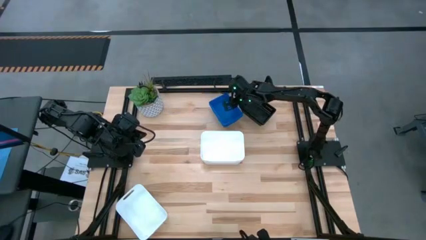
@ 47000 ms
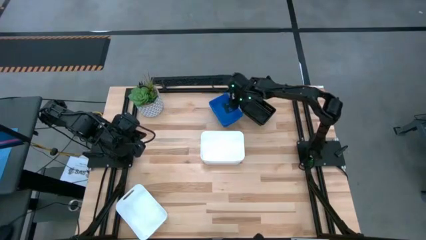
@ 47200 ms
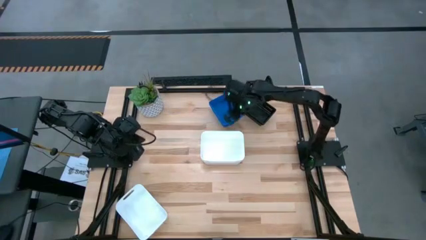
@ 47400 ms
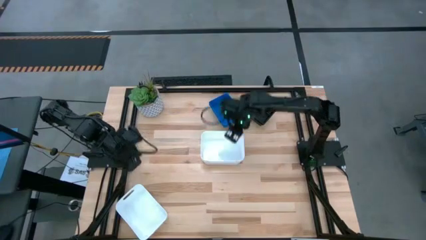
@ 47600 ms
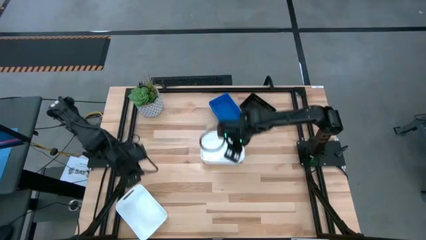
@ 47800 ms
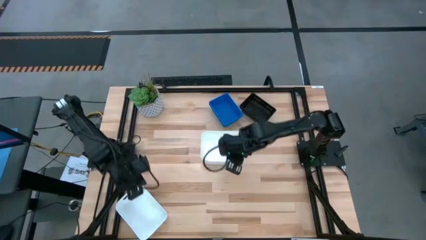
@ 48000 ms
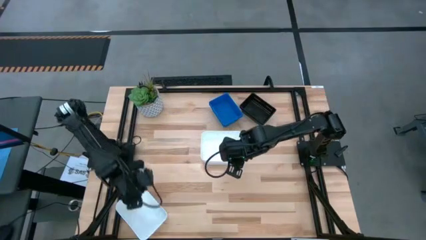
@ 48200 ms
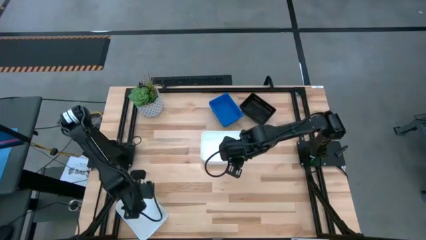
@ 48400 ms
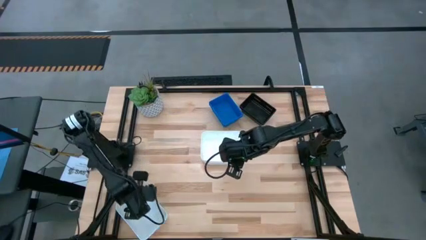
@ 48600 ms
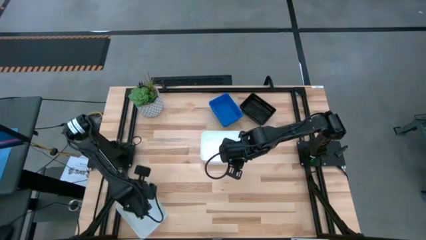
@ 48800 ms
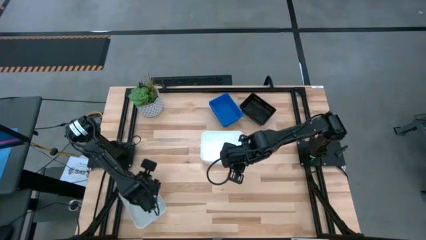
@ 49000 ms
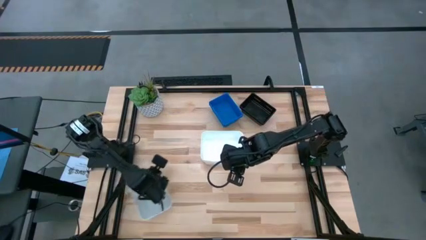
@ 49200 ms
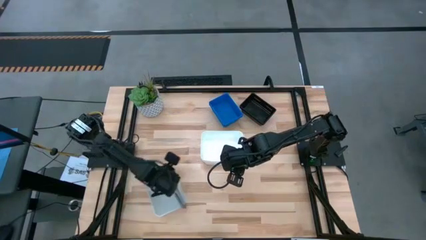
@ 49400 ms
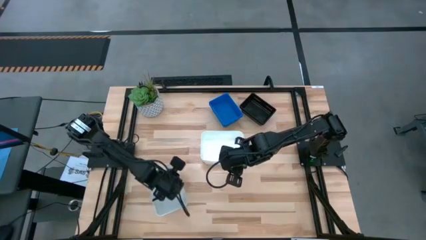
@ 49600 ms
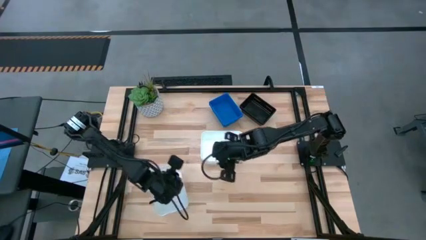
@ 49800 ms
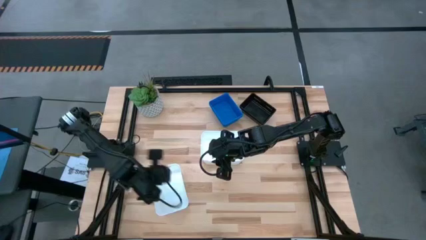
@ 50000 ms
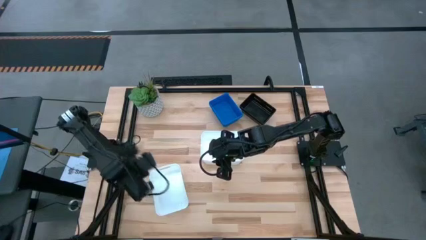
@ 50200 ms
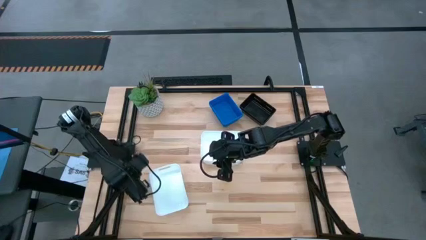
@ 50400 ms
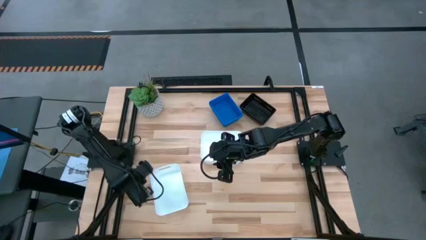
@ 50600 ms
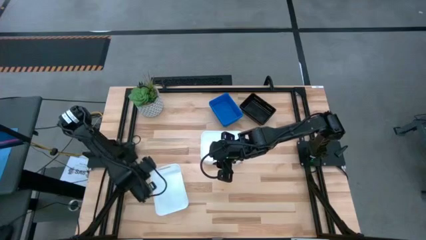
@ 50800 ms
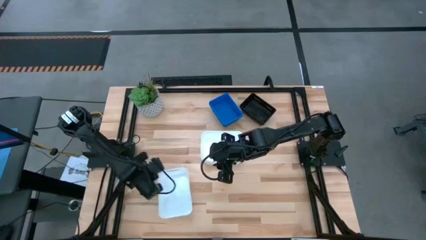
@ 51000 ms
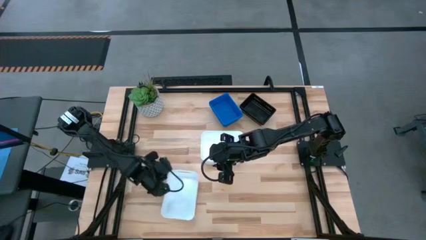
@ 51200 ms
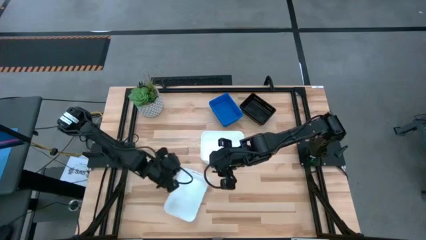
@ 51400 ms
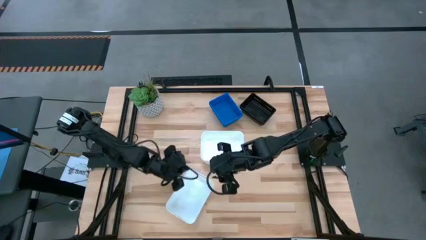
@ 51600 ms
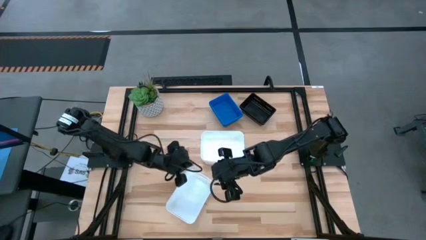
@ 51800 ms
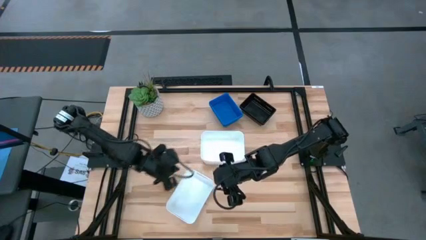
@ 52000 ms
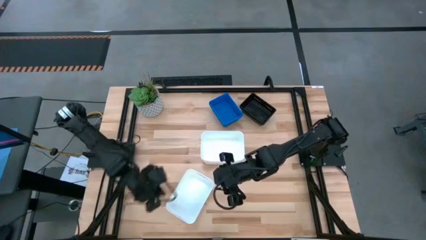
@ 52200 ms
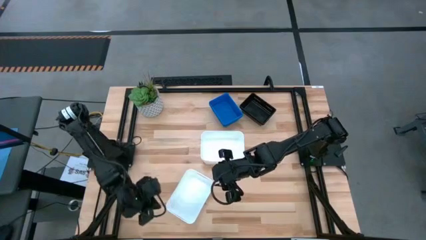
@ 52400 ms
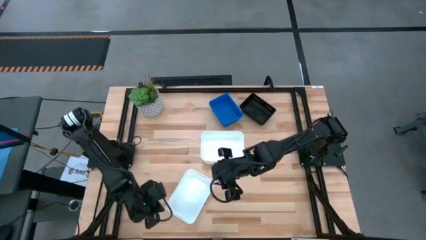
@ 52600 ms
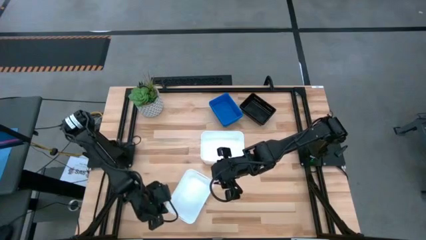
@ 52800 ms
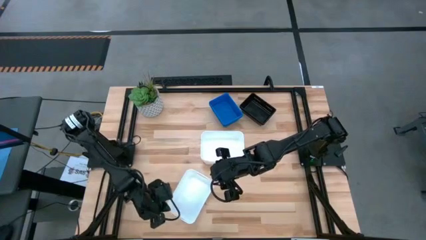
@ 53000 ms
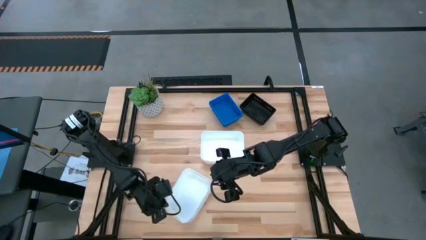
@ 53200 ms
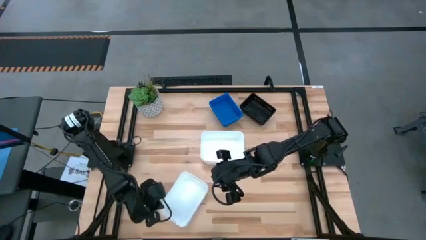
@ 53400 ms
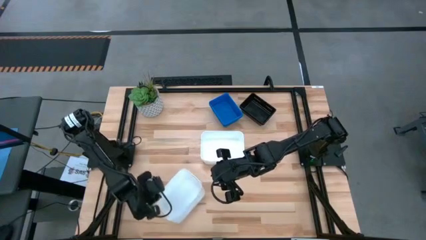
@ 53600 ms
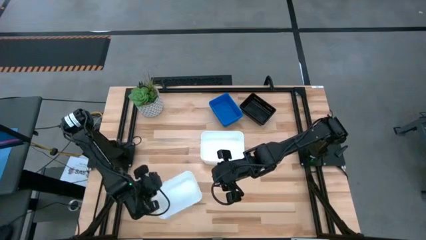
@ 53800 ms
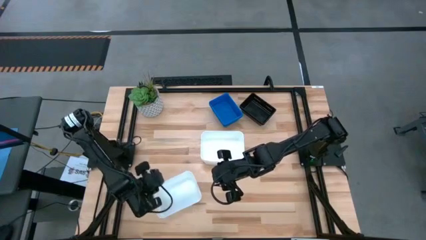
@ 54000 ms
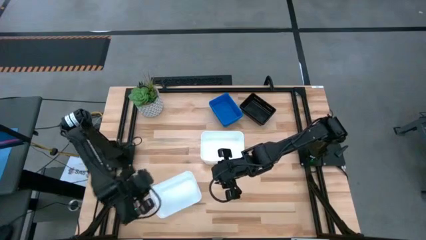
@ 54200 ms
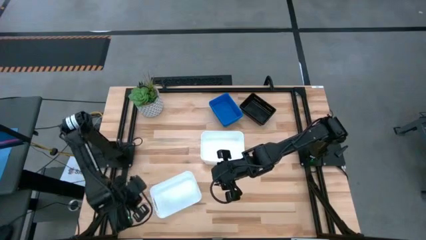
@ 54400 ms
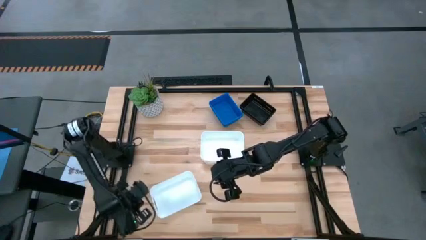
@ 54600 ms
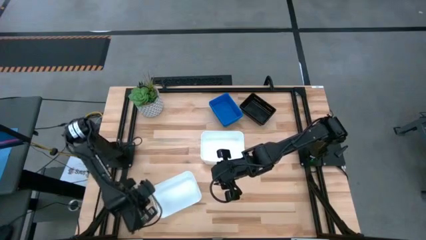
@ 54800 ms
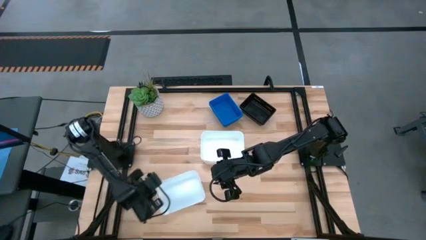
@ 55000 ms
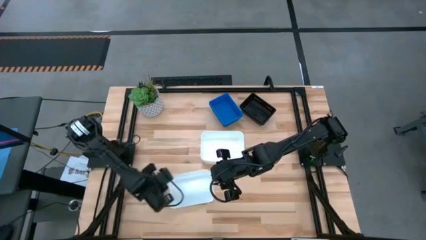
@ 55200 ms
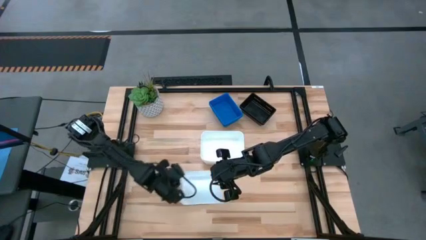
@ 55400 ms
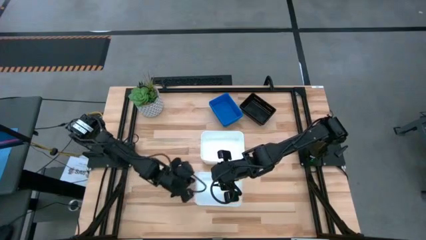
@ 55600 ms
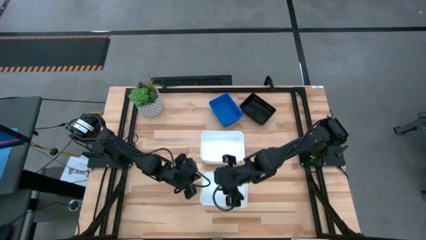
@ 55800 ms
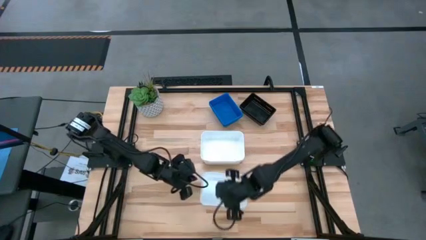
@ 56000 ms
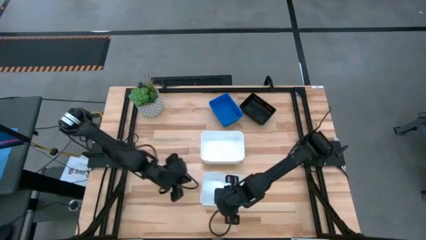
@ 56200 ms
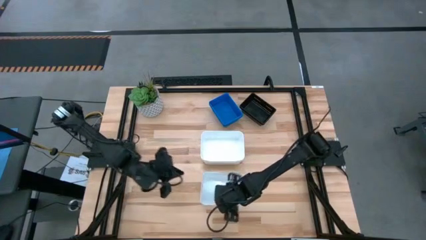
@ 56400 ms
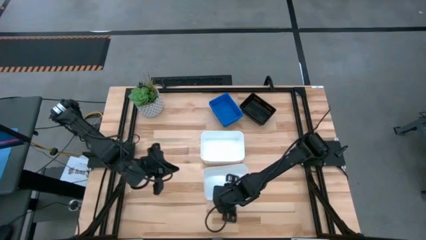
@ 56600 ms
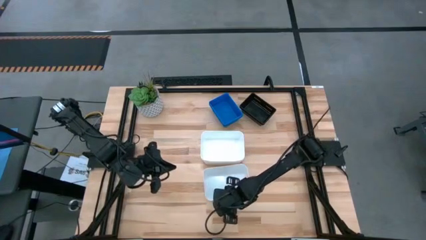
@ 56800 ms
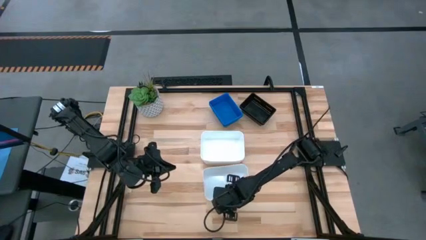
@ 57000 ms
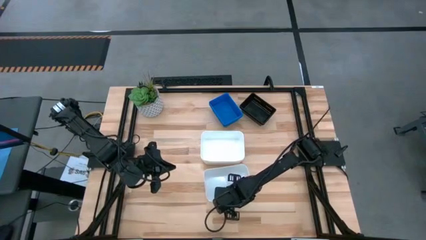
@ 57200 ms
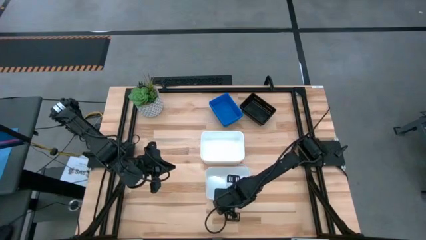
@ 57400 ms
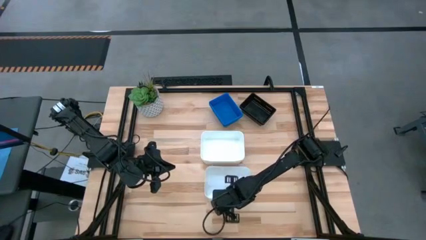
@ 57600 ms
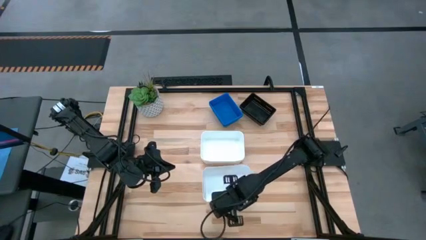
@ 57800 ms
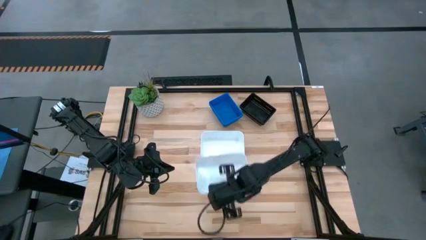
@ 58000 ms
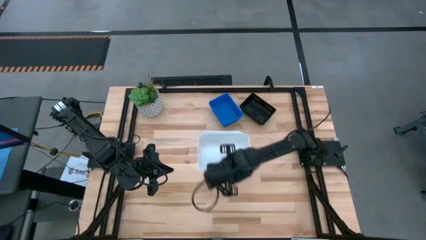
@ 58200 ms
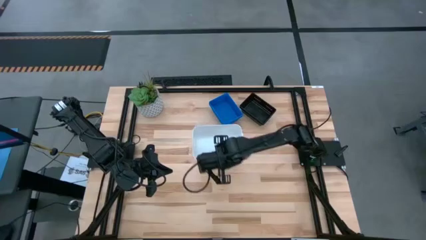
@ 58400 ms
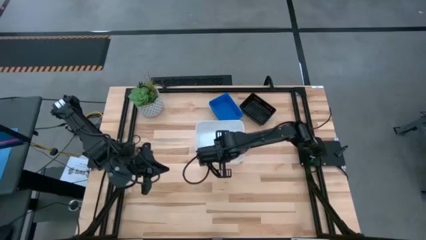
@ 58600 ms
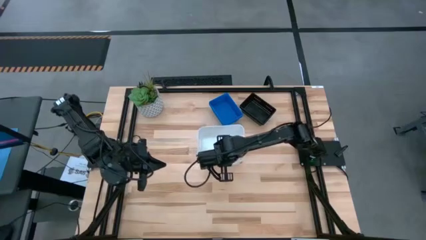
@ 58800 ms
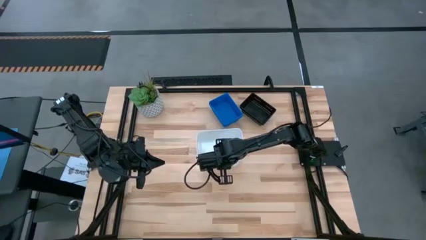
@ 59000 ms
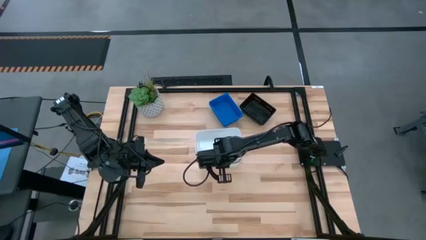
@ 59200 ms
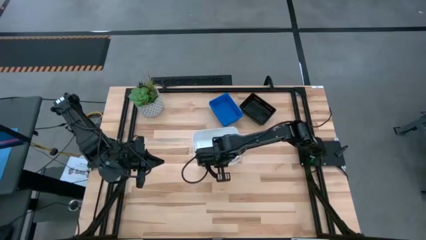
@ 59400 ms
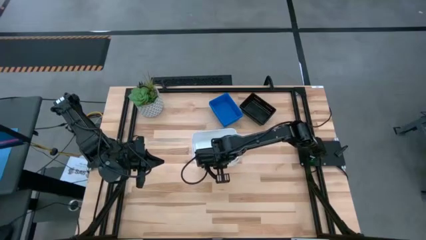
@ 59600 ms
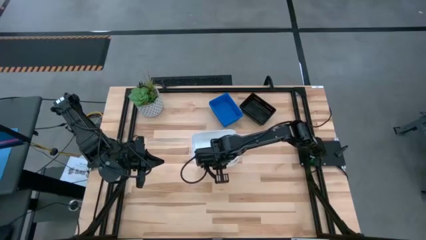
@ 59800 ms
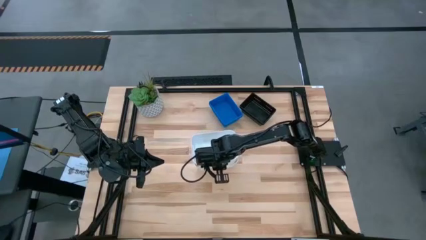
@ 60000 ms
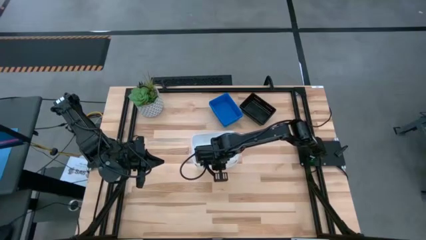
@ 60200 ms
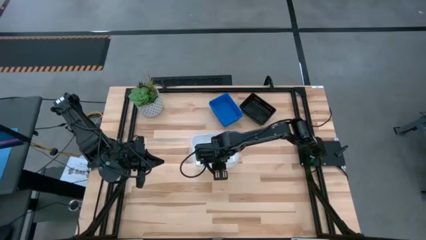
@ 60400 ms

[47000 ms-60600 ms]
Stack the white bin on top of the stacked white bins
